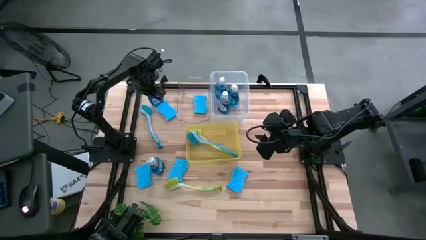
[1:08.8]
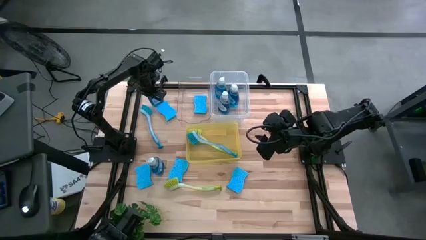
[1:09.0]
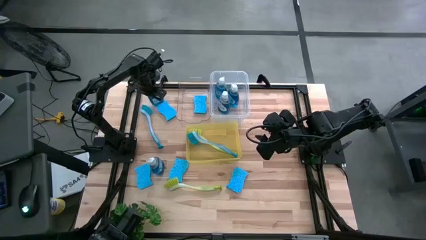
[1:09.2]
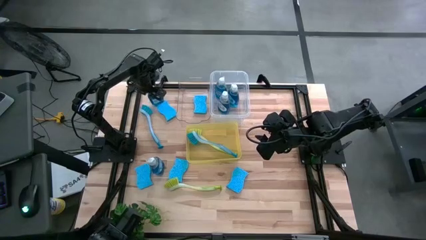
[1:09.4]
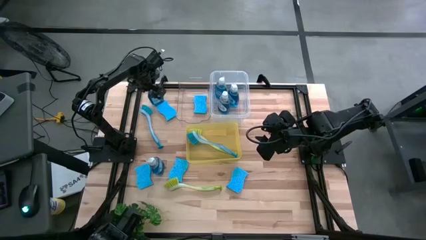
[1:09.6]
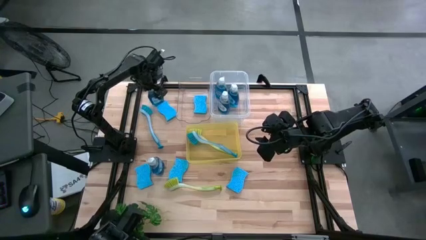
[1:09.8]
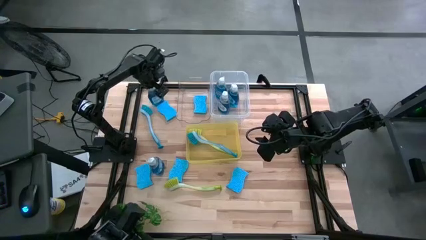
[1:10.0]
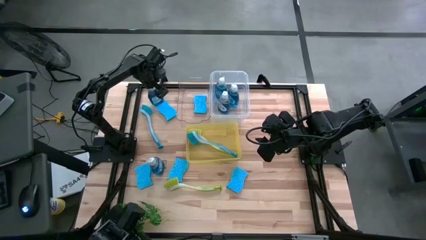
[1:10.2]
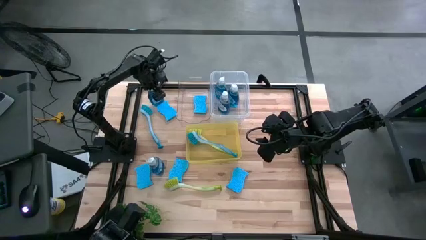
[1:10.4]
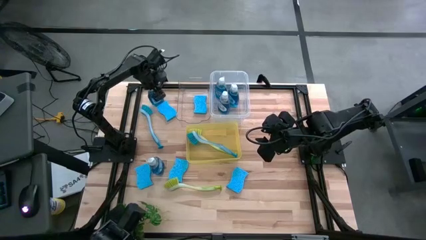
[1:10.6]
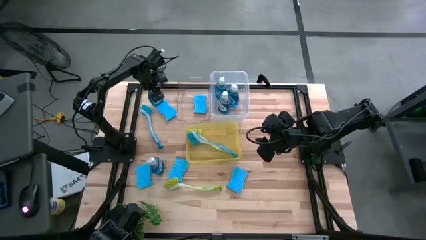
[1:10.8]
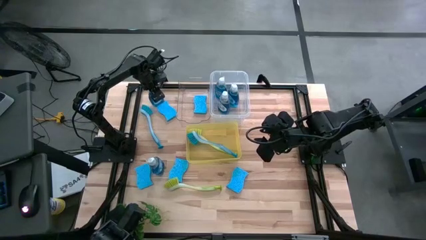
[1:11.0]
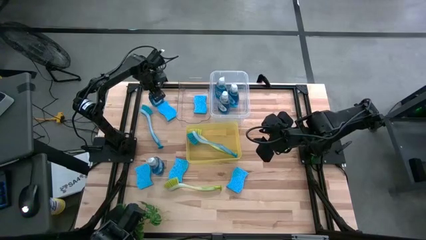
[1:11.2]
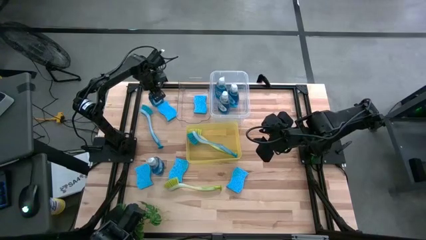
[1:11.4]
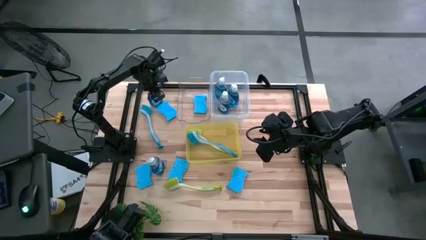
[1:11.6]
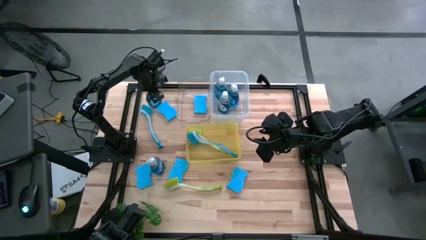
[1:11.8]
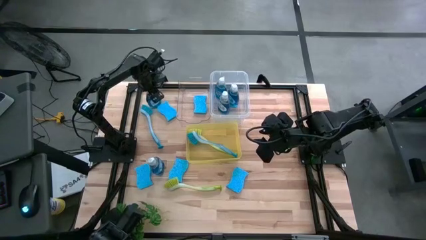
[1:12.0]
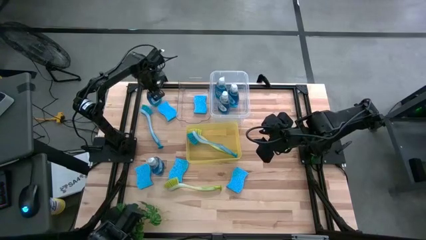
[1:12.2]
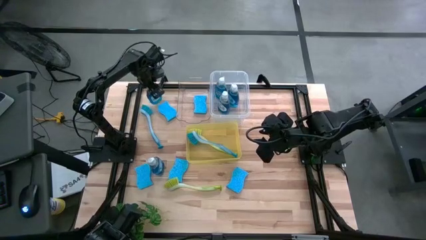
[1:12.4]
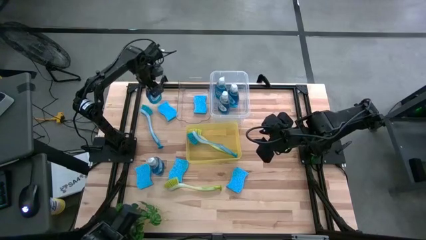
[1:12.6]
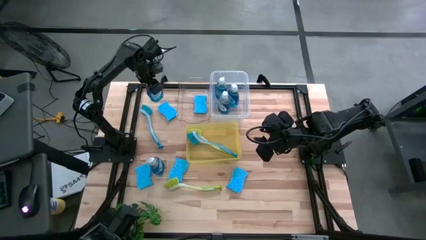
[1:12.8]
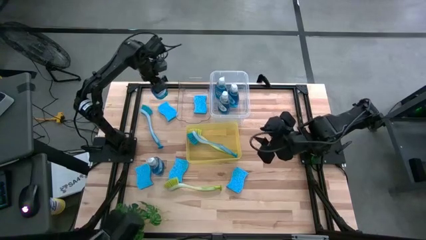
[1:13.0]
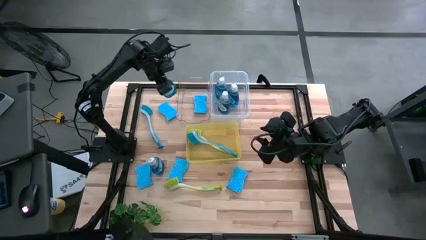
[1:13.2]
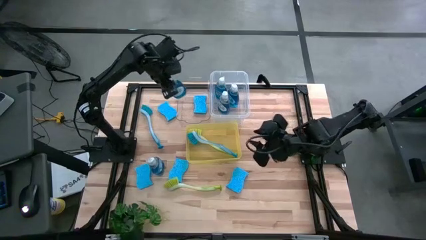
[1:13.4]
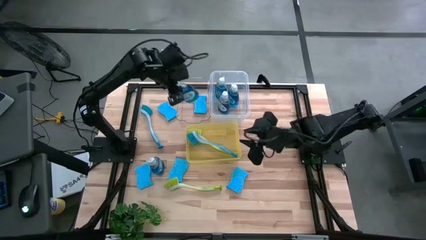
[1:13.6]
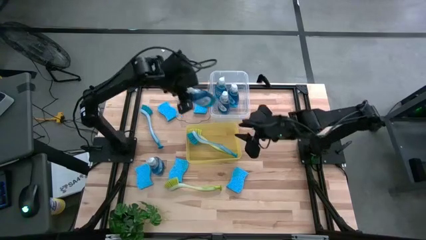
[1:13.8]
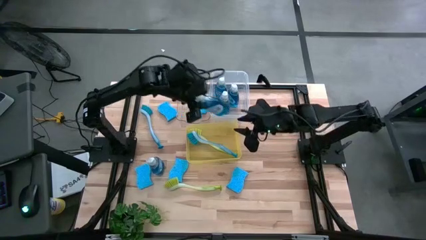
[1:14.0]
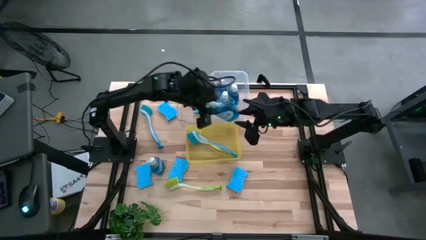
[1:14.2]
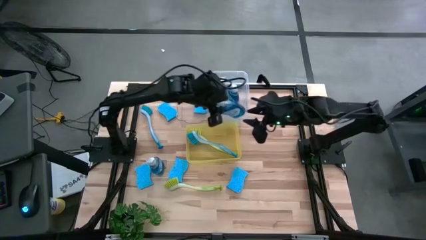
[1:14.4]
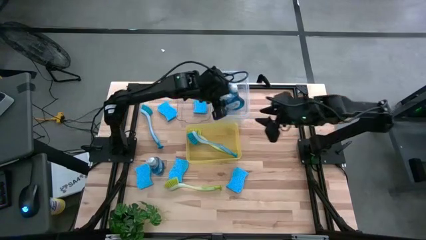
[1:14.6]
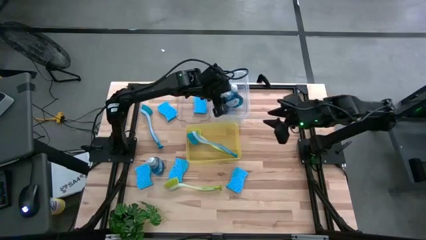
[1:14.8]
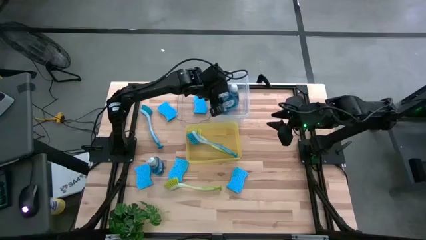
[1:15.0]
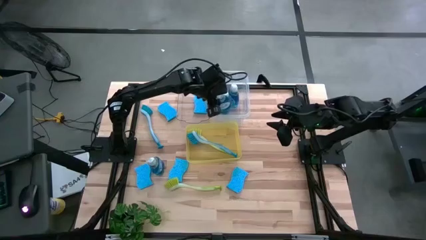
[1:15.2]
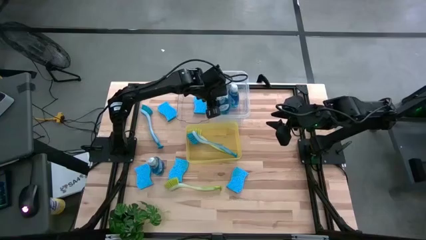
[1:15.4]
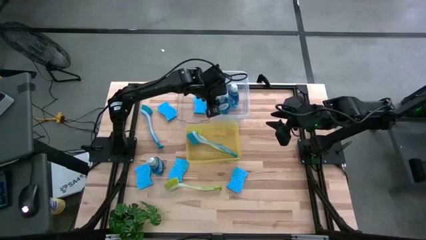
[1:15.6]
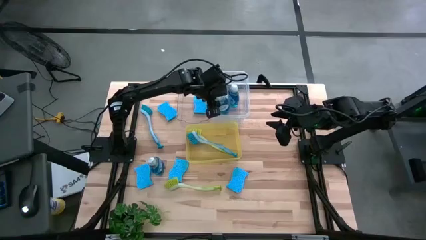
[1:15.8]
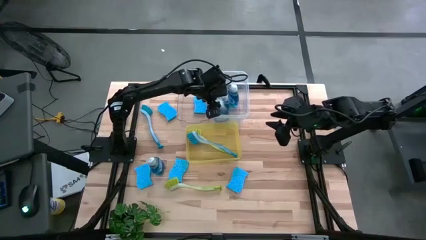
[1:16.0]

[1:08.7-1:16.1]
Task: Pick & Place Kitchen Sink Supplies
Put the blue dishwasher liquid into the white bin

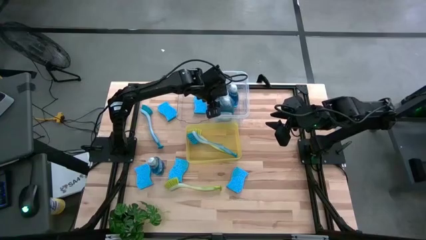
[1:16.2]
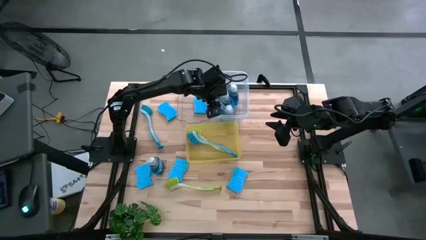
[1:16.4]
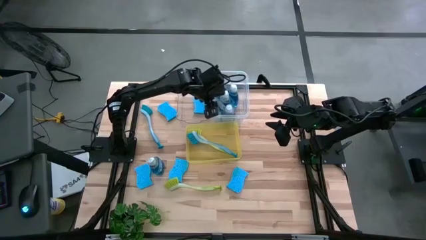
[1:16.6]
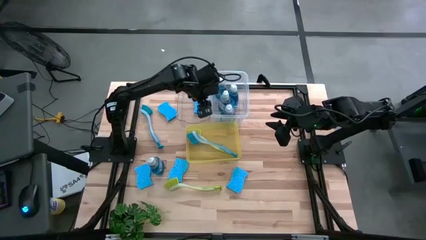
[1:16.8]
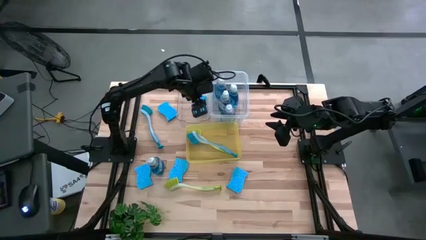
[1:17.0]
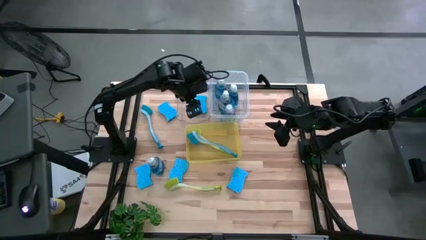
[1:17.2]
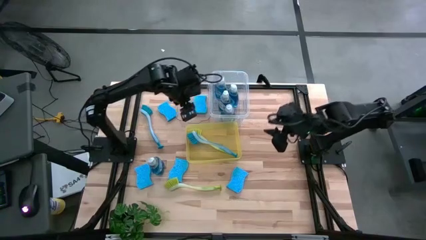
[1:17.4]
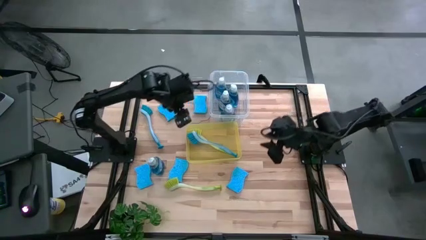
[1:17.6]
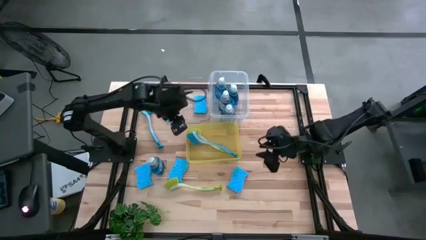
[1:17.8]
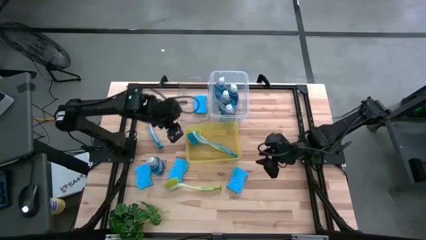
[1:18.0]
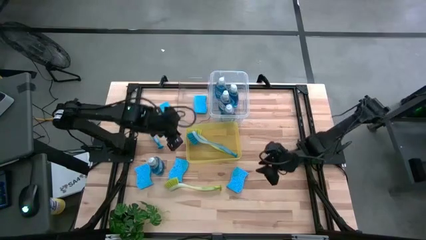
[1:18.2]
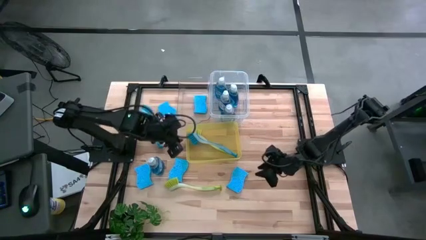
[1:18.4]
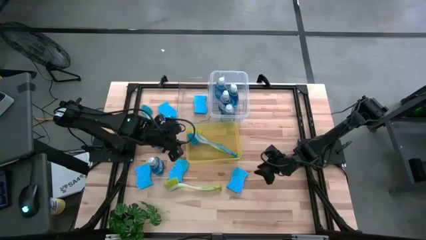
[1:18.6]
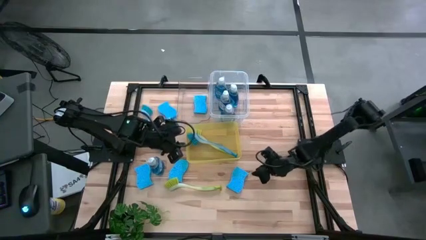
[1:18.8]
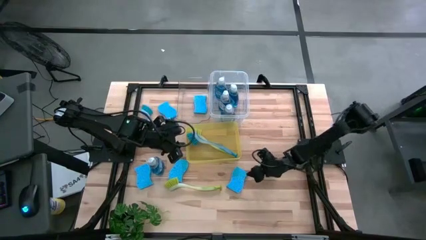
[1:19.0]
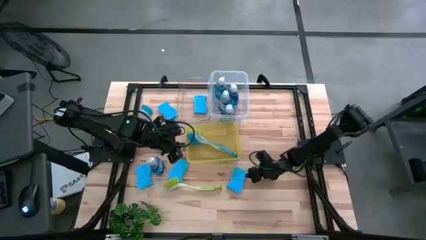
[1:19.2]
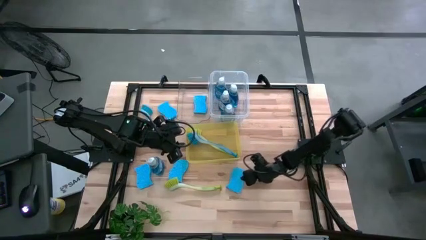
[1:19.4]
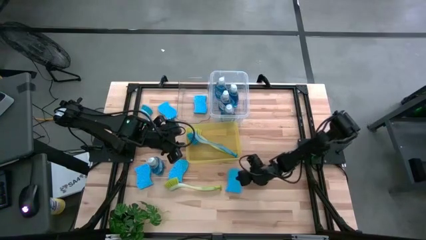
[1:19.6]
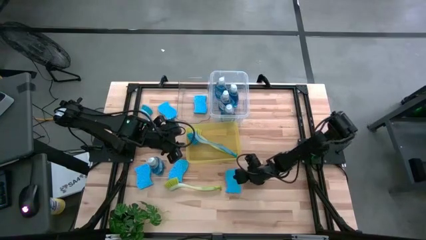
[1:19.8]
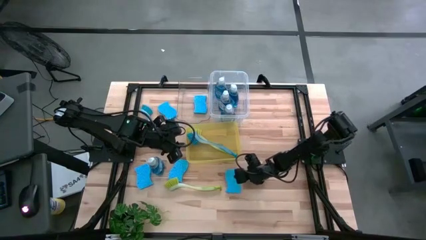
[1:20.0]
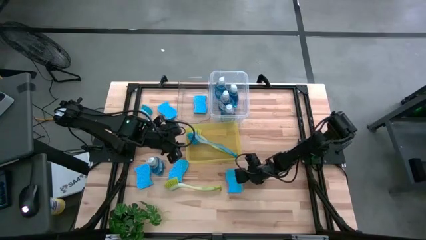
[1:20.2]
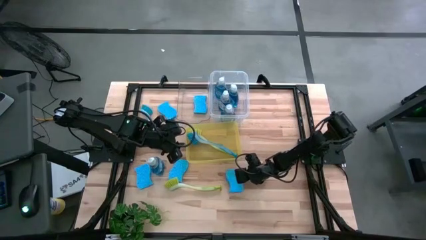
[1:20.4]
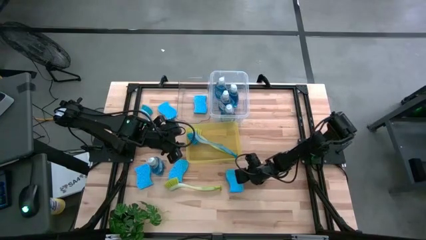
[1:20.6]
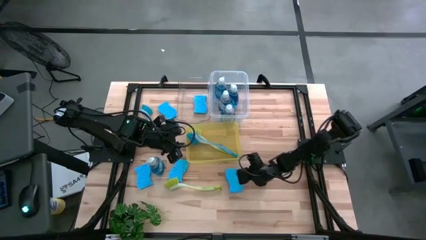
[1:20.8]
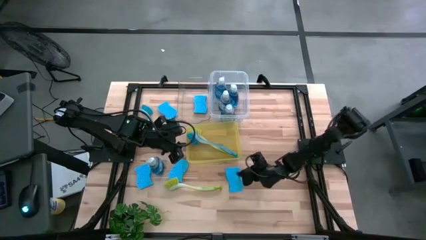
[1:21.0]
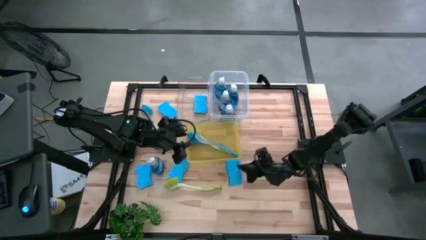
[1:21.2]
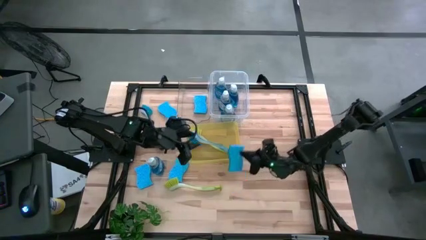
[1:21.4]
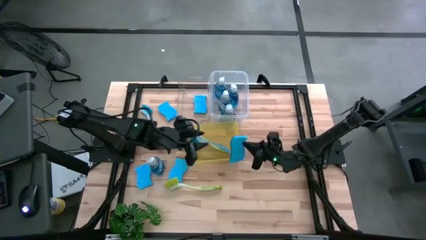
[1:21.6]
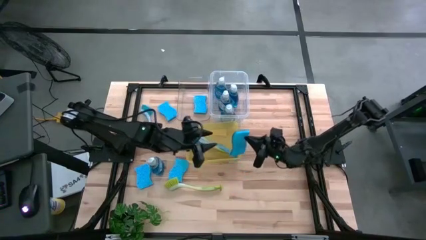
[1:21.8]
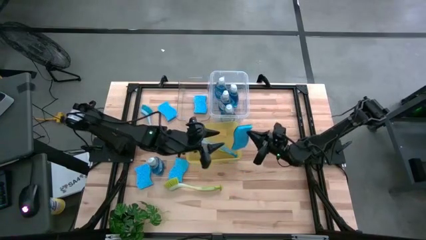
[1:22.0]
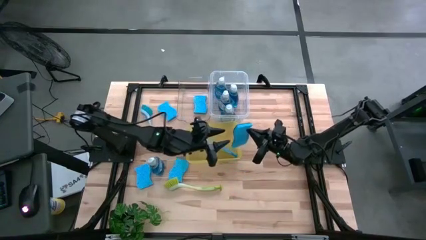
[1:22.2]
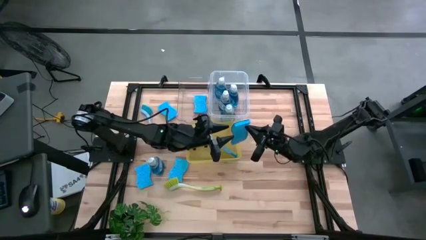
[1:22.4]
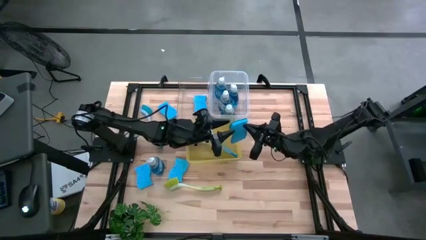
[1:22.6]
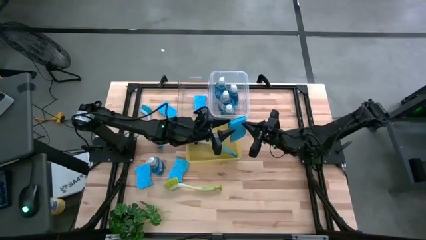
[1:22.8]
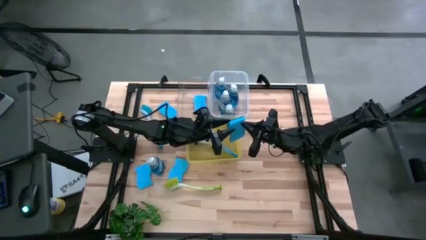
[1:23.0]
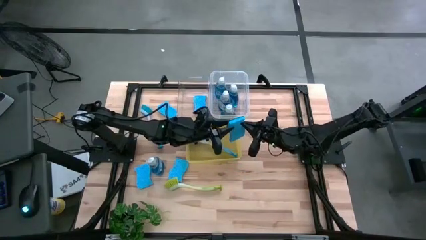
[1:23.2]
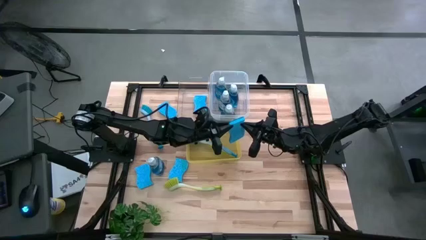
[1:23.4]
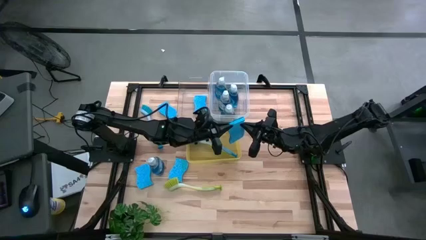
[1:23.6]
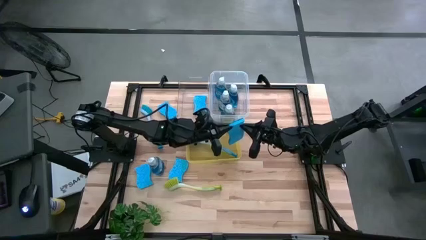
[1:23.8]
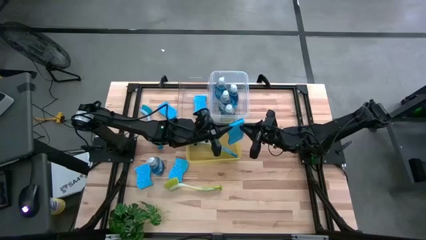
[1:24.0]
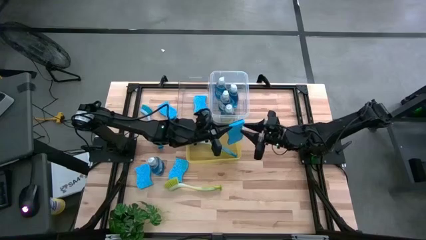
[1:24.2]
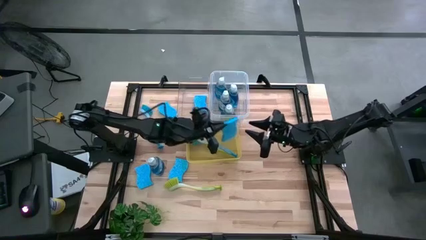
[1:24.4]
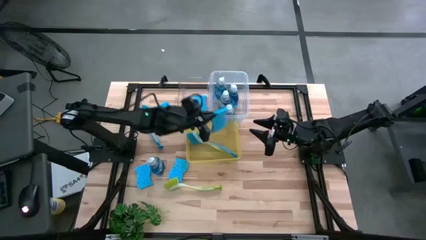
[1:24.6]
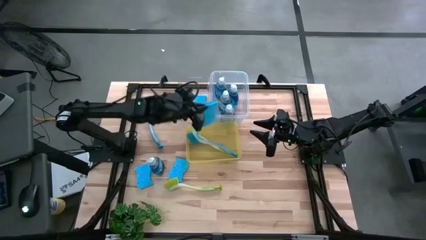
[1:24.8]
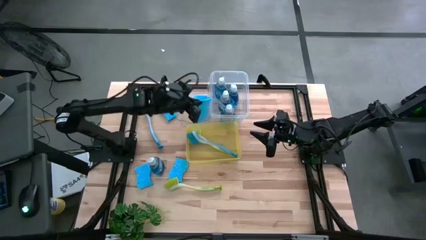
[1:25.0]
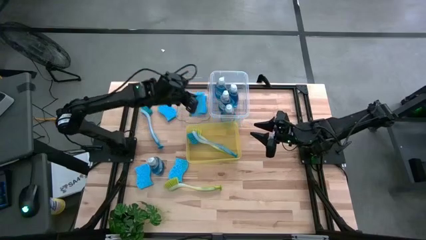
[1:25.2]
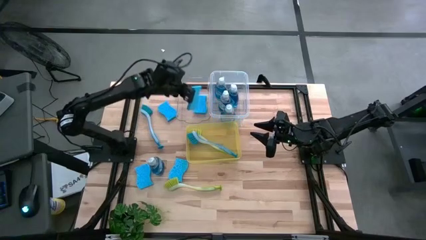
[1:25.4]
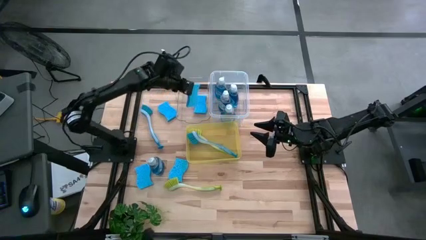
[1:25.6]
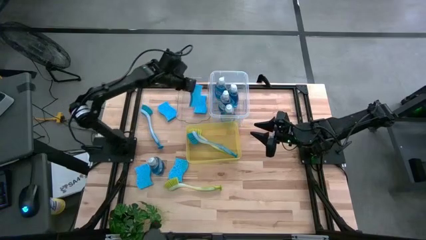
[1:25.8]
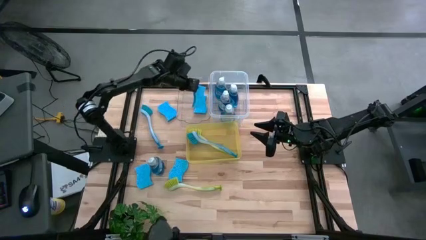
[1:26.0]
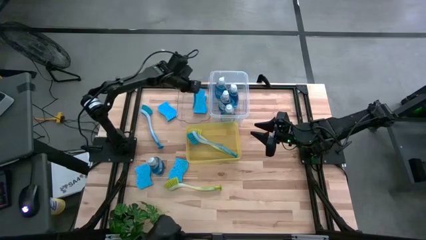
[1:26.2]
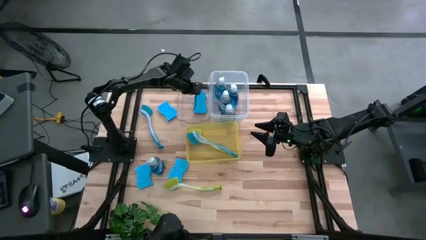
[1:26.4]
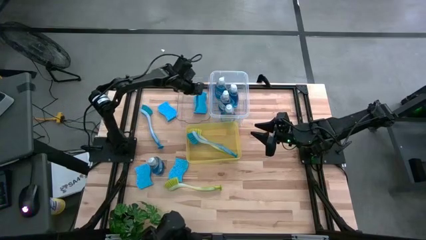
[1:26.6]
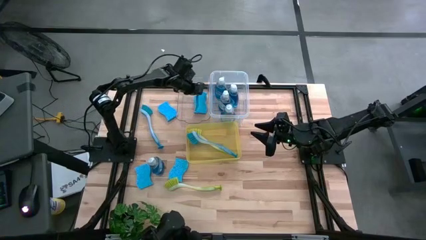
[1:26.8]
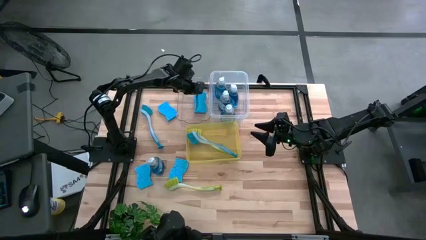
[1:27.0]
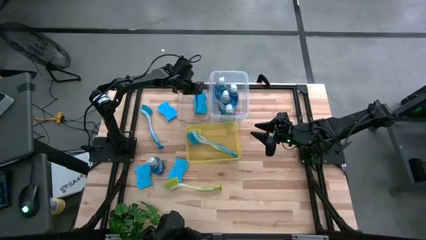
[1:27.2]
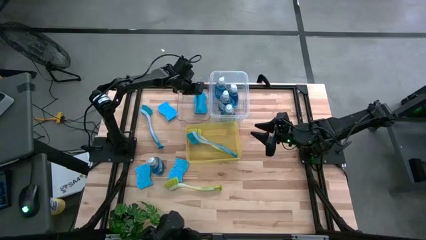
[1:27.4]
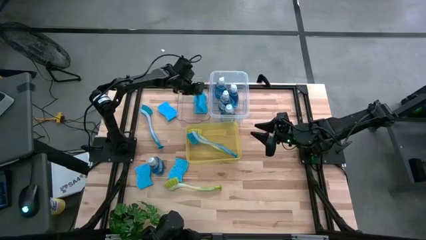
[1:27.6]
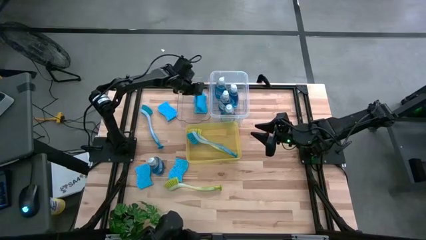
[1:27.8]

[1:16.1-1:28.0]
Put the blue sponge into the transparent bin
